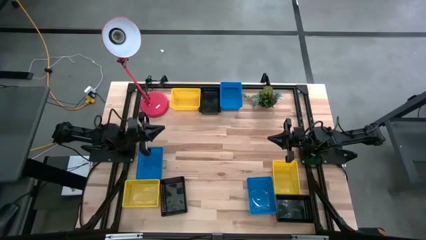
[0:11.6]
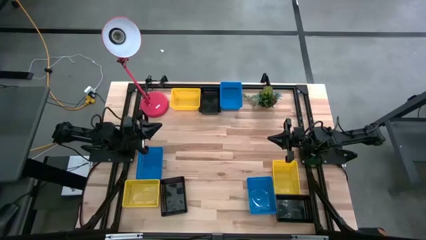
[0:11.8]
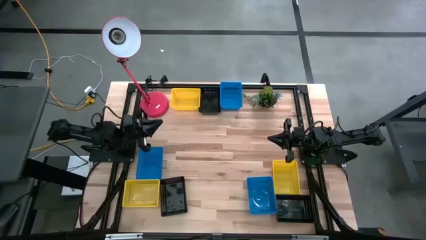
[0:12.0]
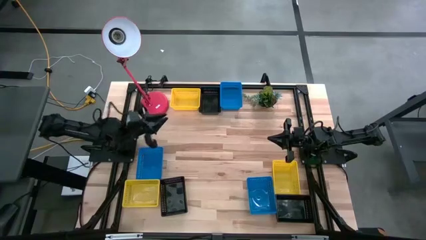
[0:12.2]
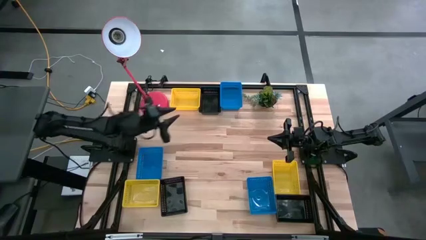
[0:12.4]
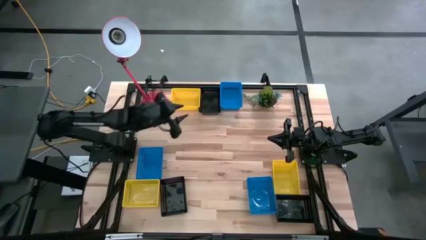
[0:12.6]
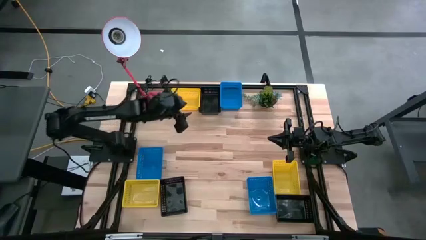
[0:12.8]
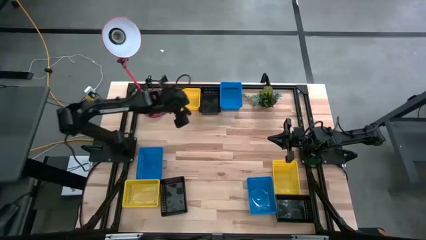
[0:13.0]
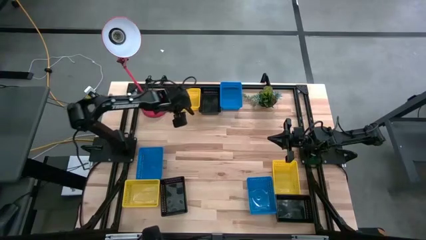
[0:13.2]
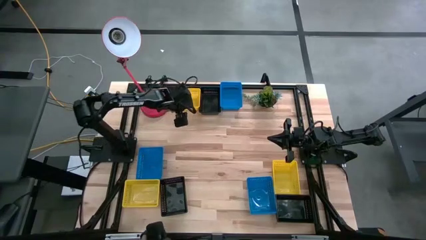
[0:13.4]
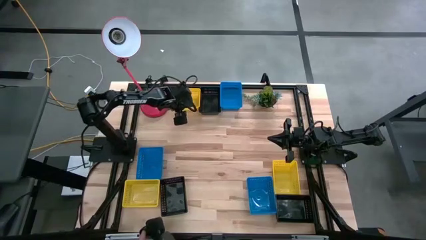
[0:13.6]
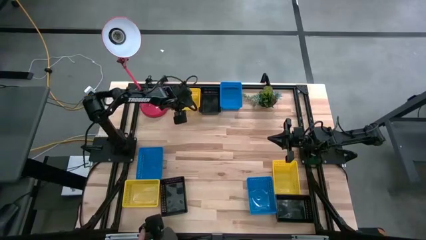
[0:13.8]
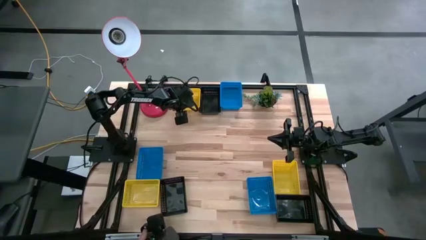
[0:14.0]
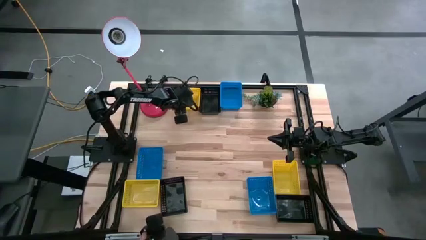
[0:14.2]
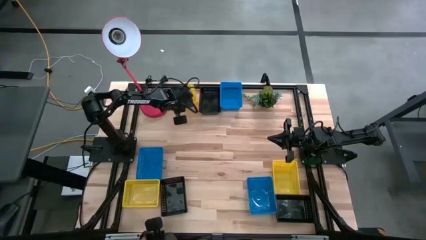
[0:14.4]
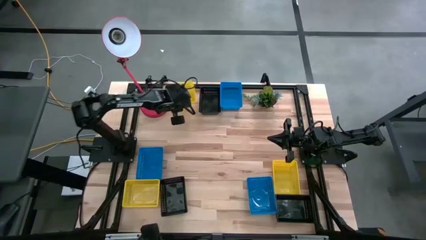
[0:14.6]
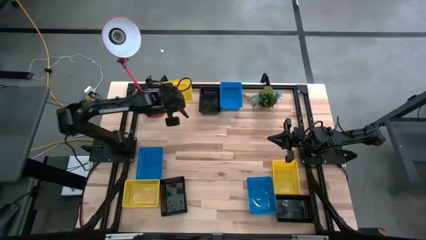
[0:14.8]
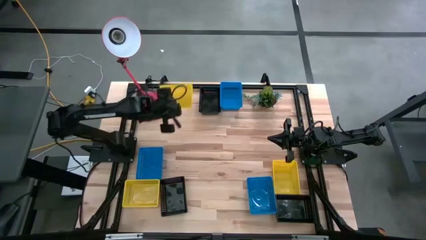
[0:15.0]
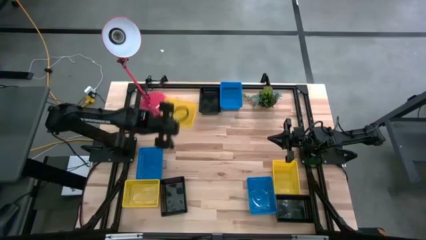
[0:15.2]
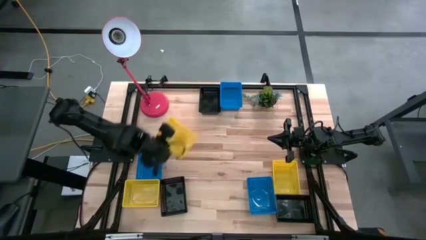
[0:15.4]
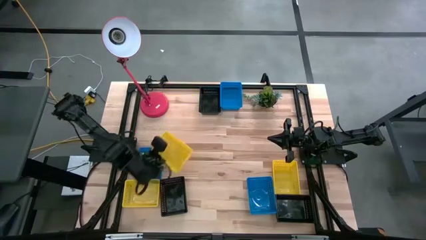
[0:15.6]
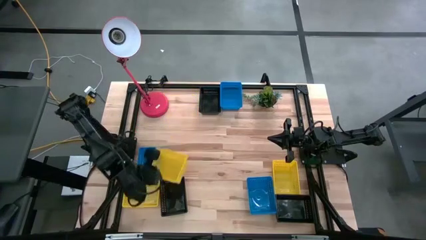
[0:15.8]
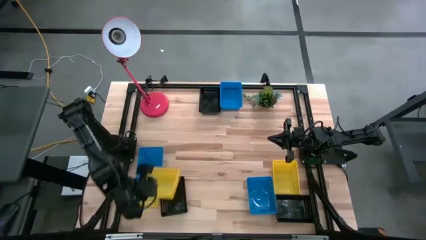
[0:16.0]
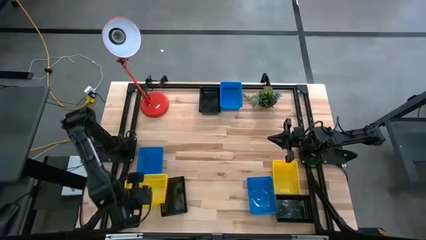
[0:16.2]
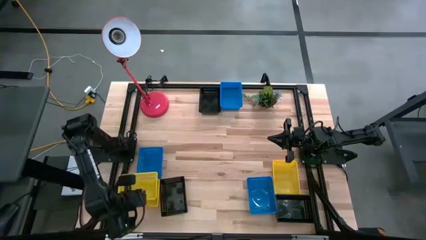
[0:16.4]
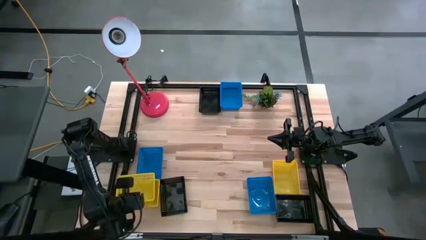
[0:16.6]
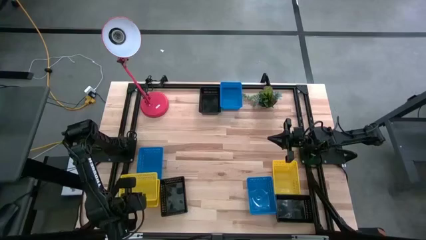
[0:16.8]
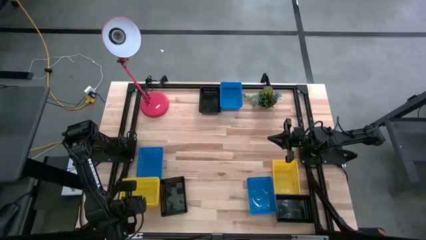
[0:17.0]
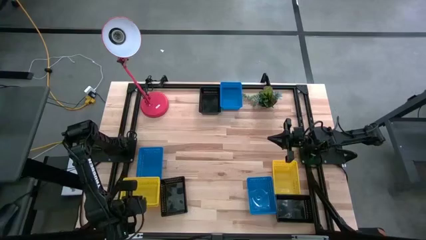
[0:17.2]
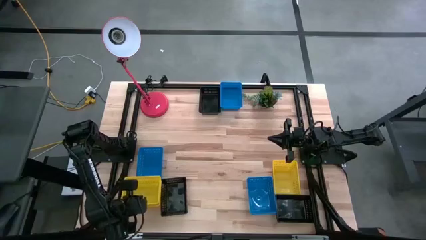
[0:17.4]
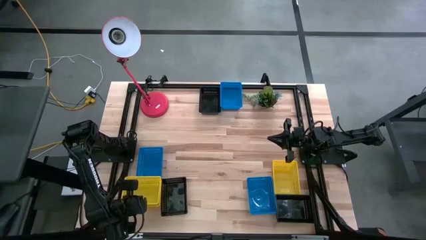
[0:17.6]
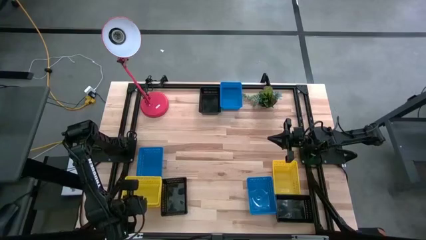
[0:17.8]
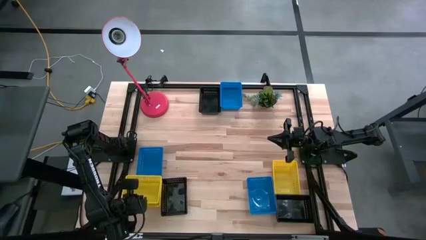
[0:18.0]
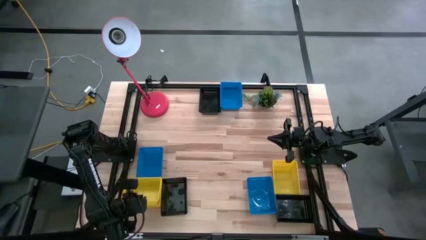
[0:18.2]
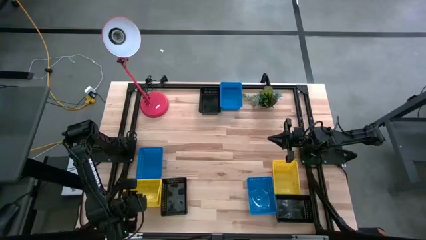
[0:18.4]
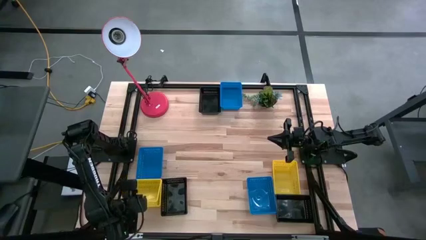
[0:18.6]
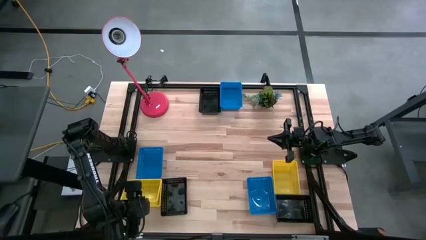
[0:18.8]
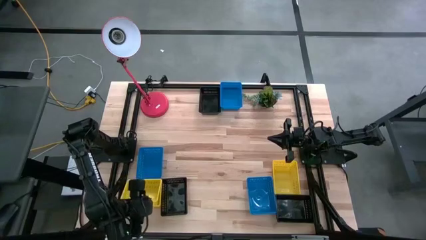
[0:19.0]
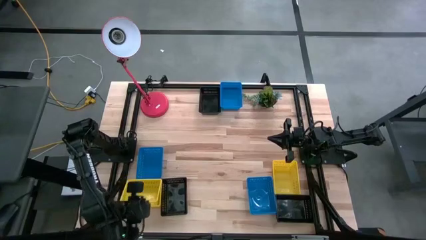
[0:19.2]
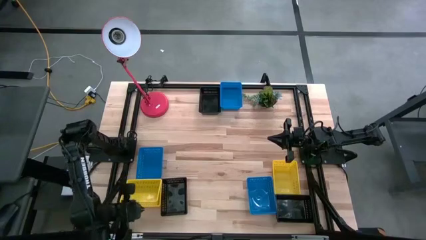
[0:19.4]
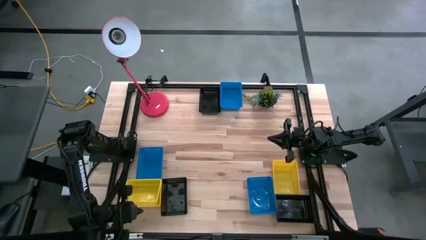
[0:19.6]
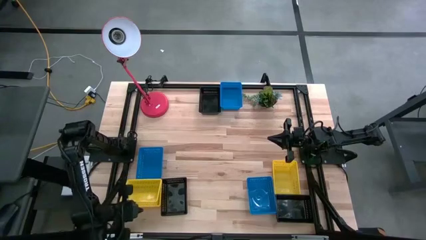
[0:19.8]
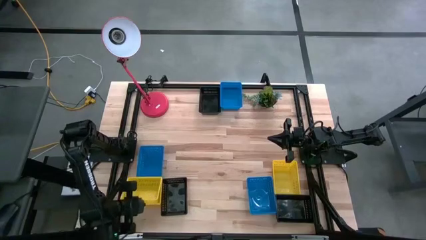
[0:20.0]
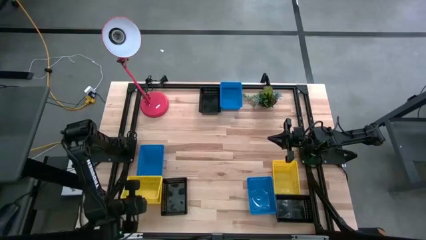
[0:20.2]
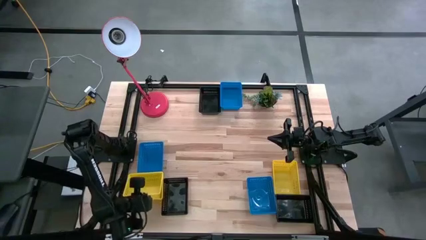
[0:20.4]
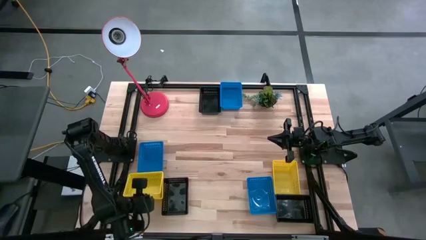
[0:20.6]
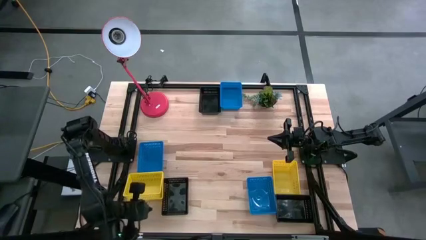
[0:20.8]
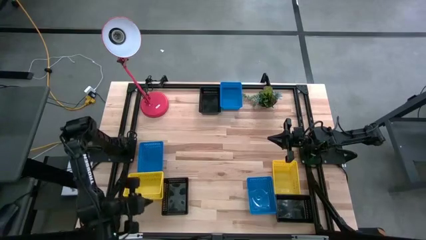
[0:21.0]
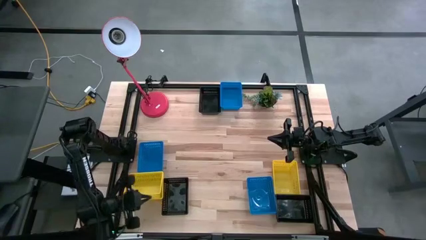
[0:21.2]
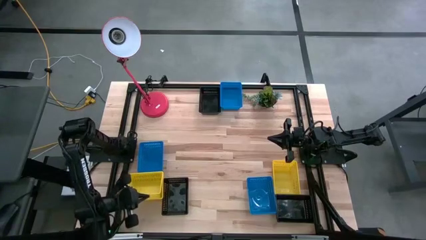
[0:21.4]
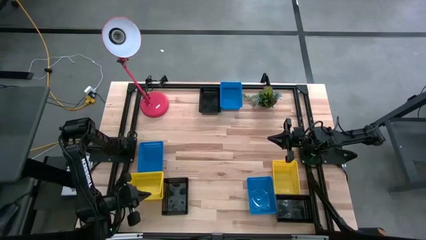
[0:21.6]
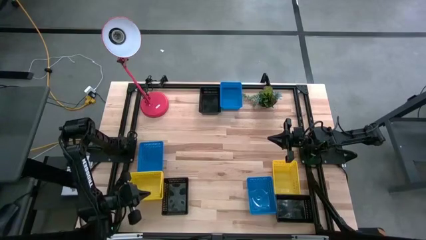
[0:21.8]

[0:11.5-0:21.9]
Stack the top yellow bin on the bottom left yellow bin
